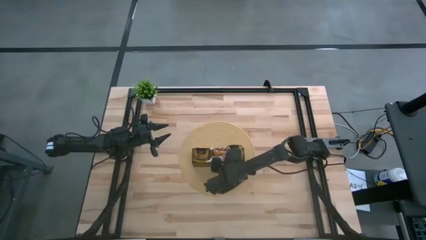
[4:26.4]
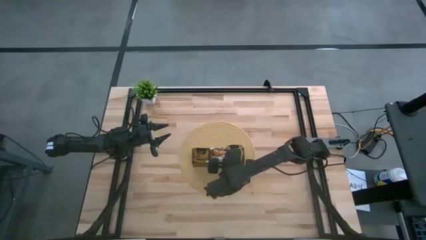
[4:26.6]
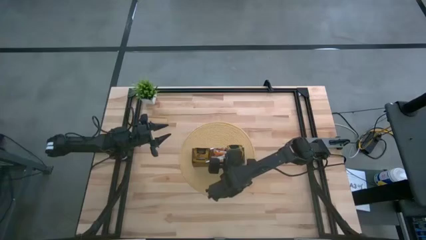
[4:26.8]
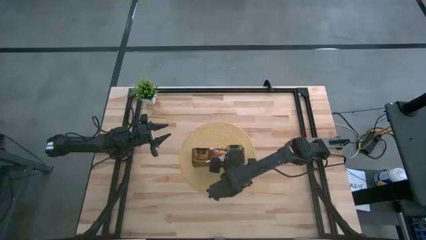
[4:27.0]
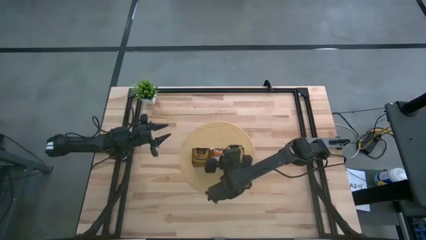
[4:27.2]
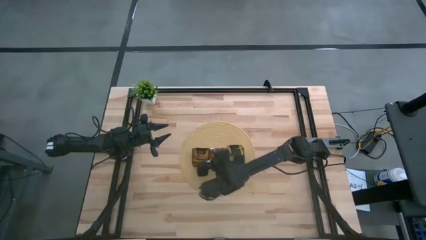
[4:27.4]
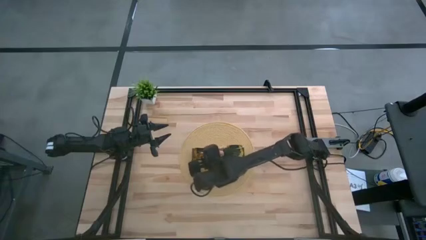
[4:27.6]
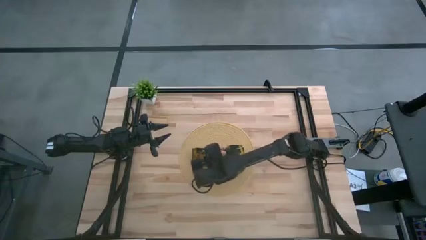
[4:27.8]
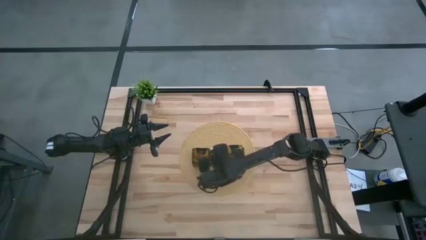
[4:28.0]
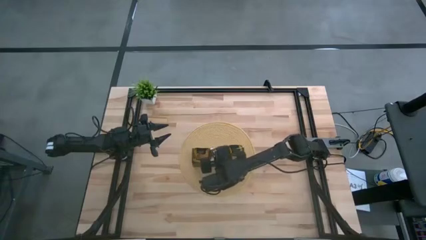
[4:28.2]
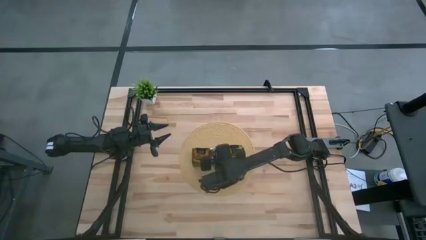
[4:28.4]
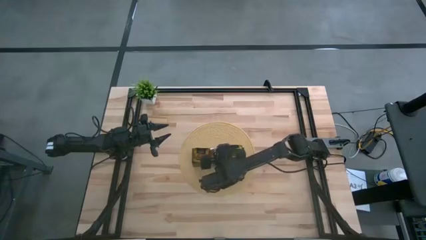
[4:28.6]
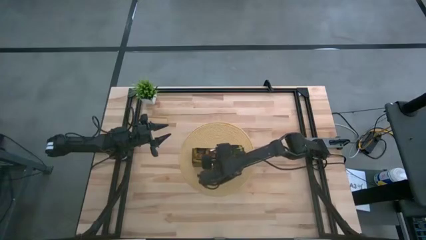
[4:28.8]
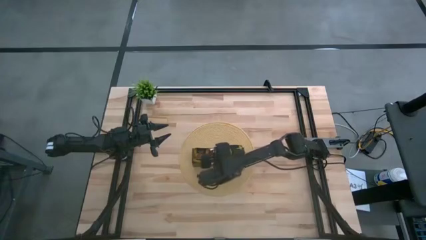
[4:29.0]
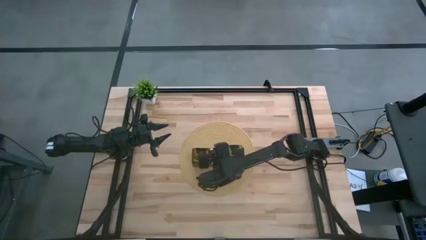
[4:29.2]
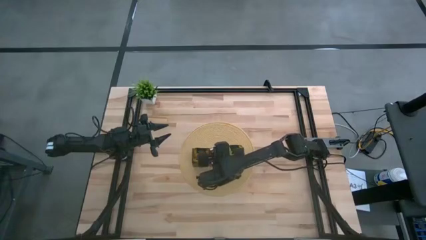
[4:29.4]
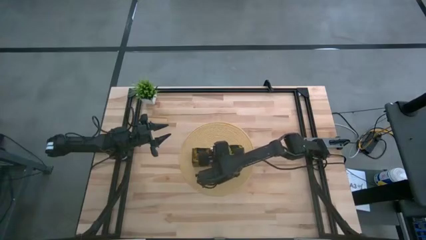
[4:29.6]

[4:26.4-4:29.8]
Task: Pick & Place Tea
Adjust the orange tea sachet in the wooden organizer

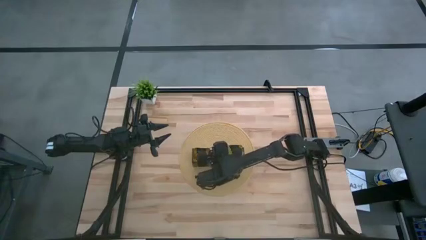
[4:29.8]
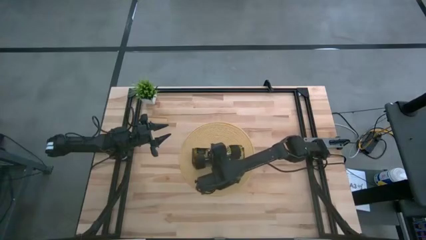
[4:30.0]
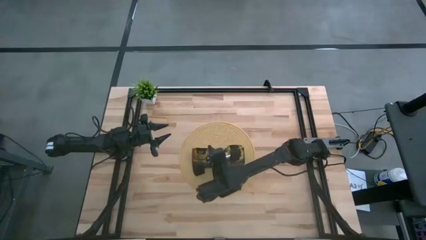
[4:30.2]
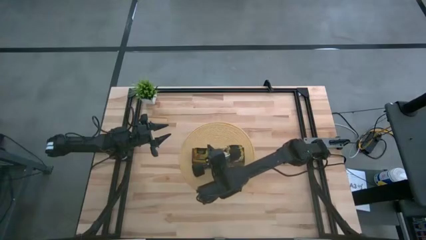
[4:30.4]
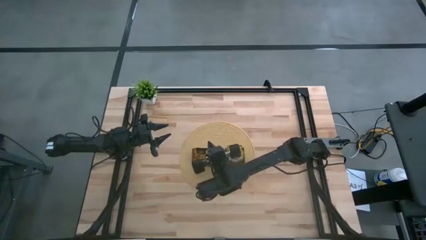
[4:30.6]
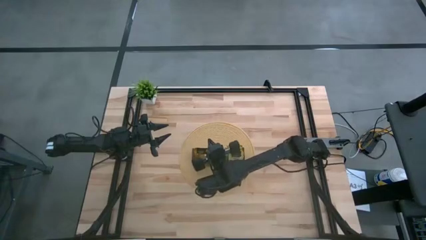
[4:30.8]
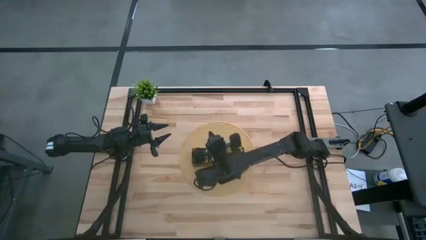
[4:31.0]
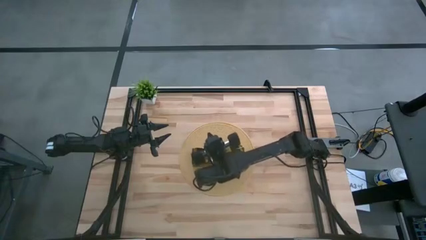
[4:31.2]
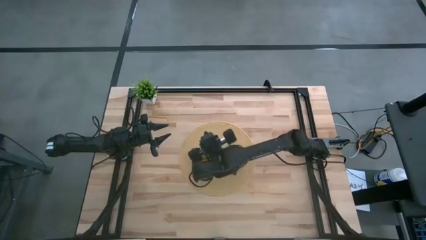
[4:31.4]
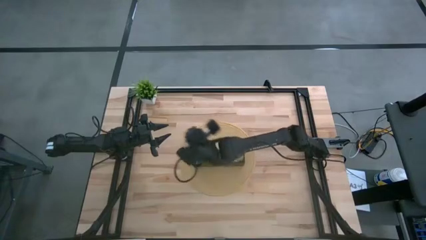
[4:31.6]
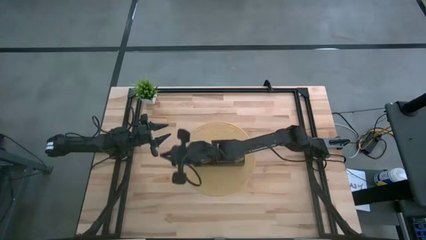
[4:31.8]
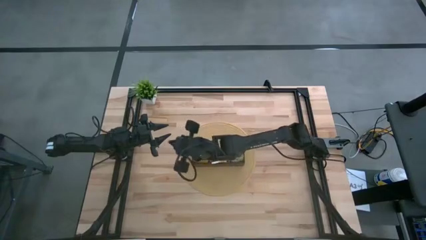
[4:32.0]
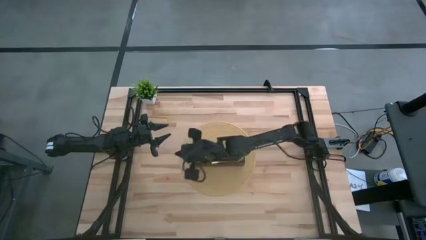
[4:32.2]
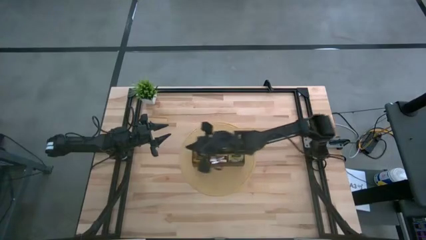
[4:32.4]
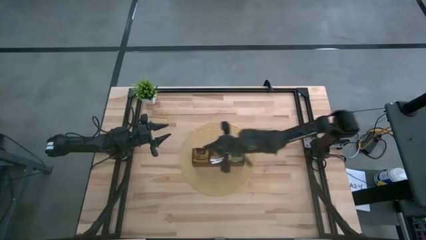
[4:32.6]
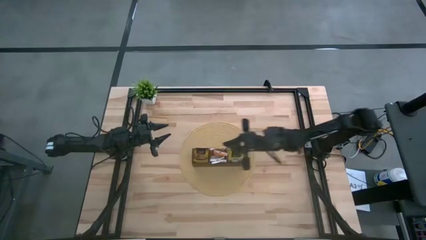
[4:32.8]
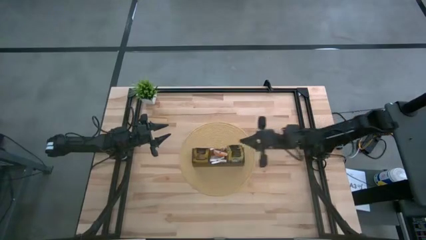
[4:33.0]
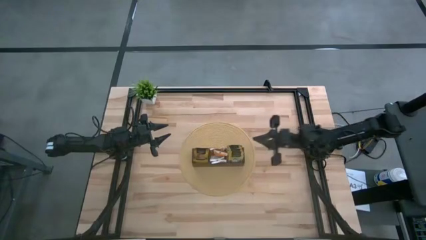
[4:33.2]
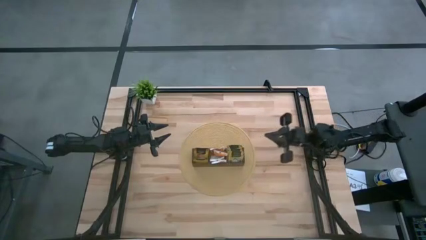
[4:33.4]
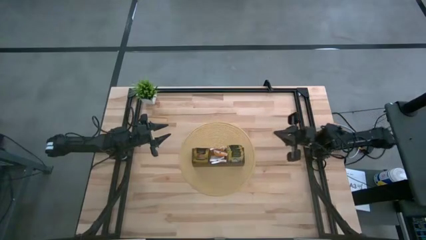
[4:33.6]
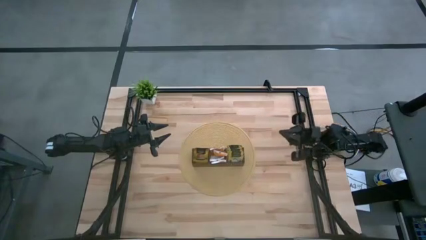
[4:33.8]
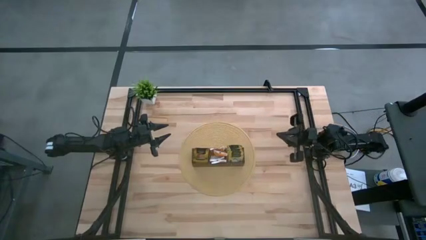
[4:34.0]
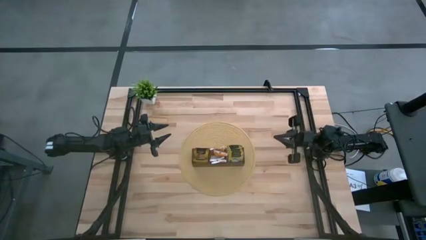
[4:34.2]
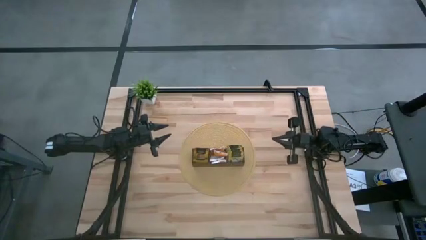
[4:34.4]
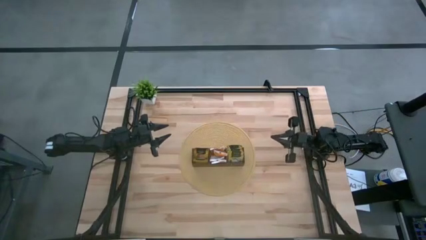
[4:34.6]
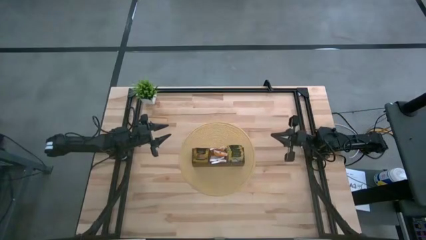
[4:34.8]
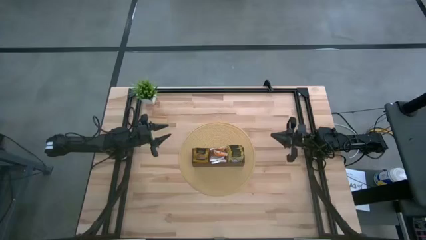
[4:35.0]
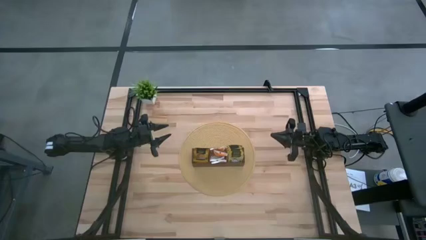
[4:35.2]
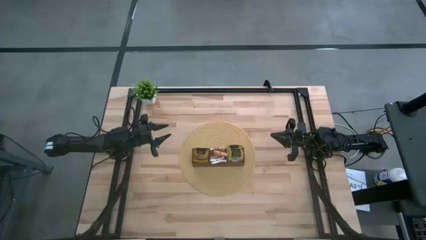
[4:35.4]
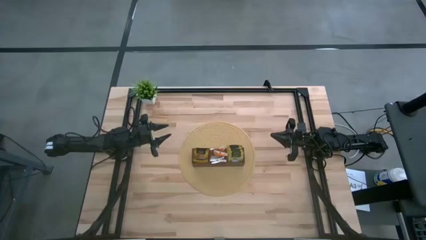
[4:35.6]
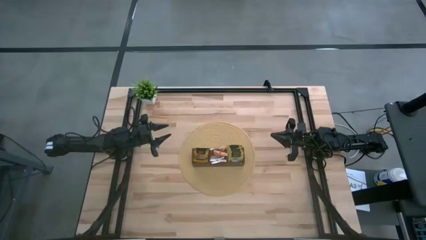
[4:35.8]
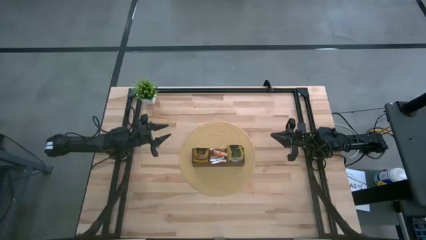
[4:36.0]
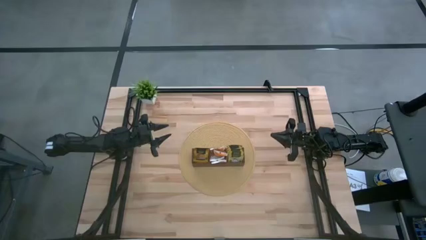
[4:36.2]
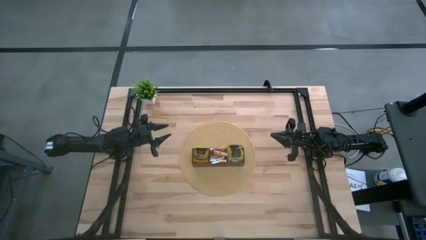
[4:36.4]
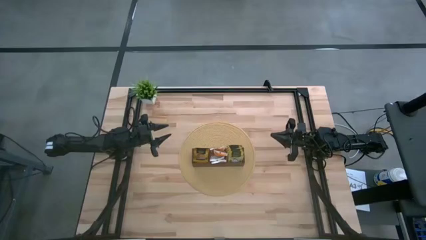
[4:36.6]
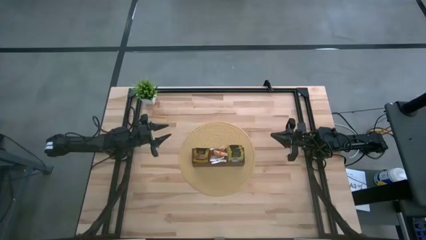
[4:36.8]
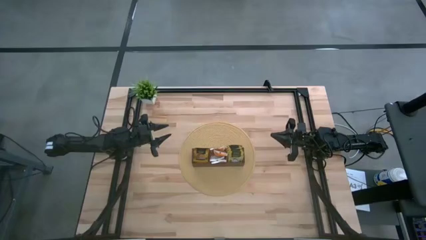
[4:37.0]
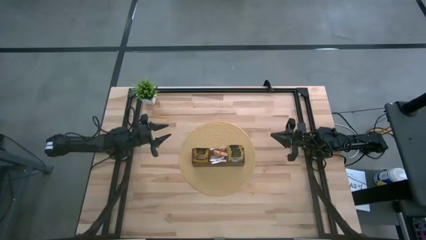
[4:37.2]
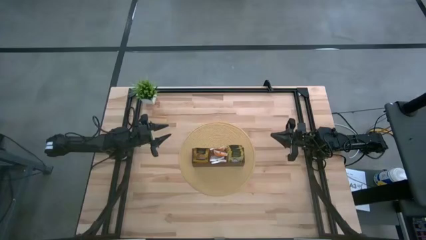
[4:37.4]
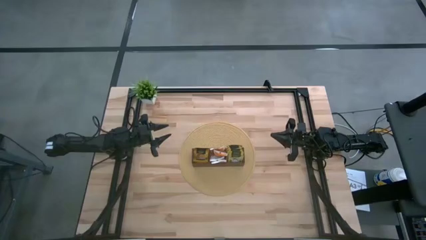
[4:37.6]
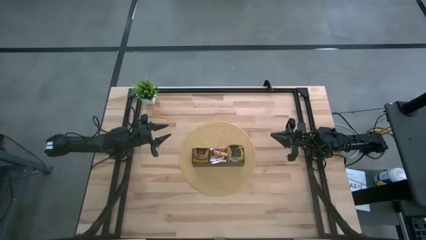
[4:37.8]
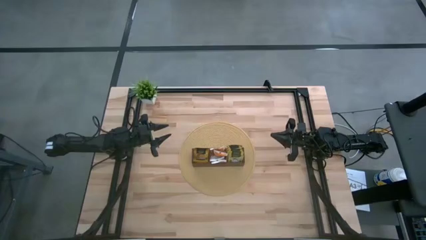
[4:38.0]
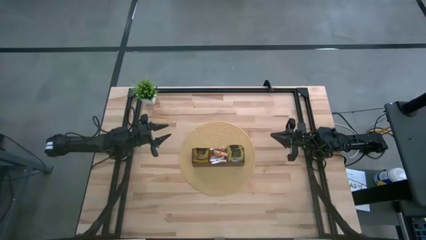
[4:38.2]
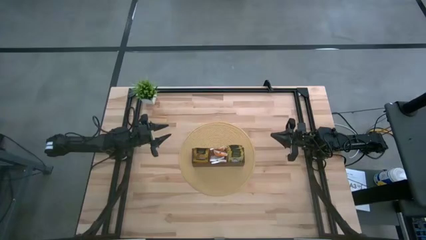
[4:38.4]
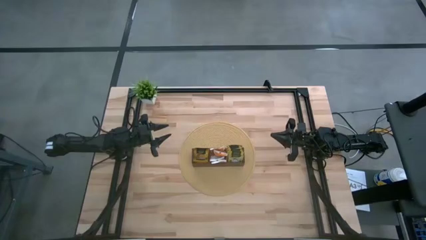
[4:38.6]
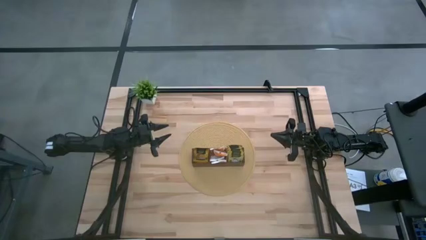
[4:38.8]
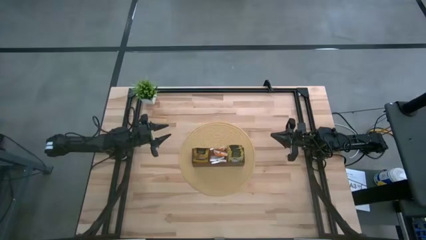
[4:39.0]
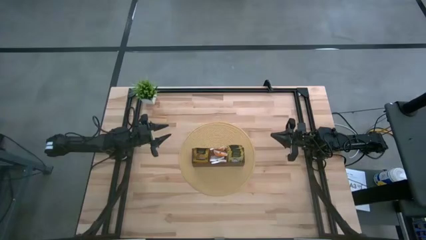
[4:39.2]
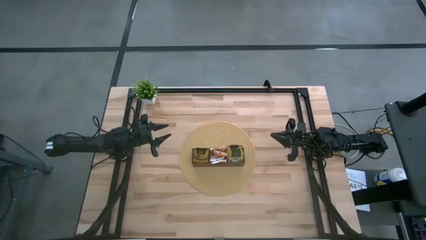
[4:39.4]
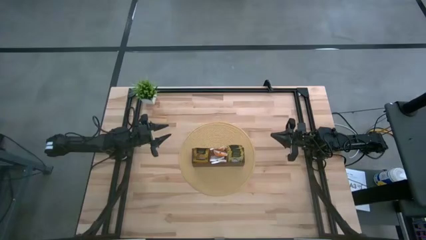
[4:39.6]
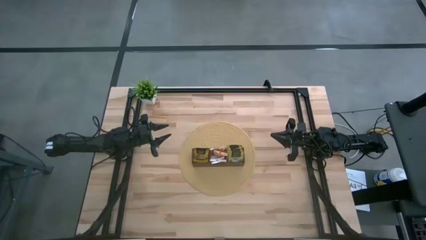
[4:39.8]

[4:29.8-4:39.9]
Return to Home Position
